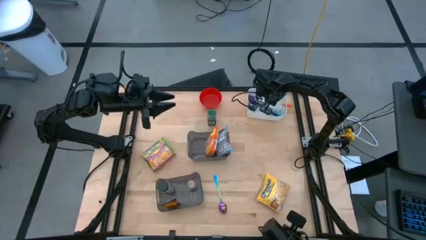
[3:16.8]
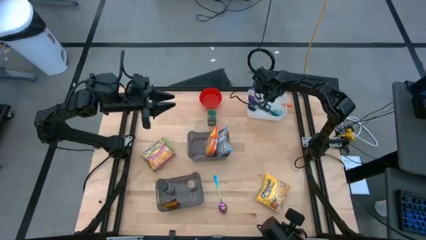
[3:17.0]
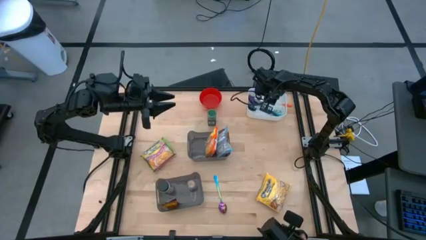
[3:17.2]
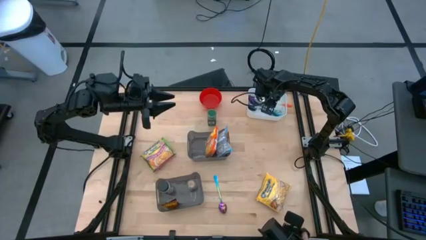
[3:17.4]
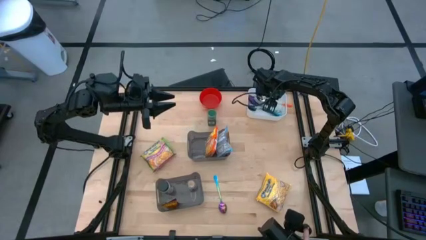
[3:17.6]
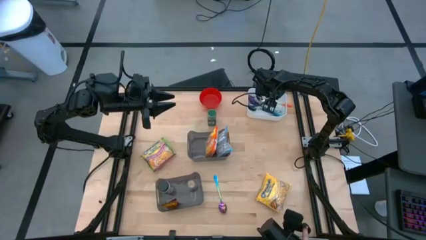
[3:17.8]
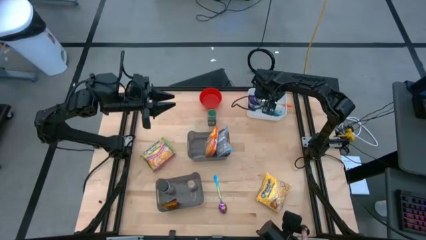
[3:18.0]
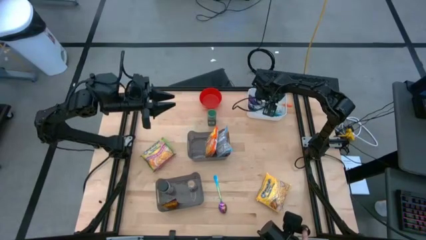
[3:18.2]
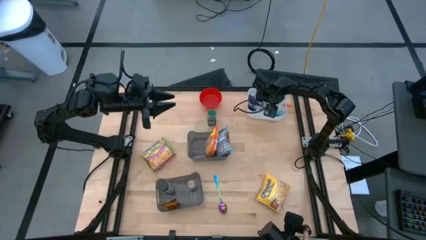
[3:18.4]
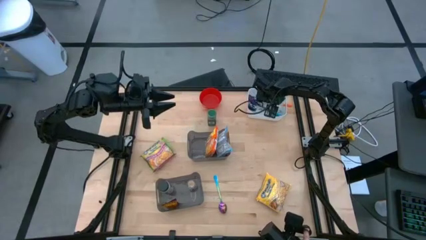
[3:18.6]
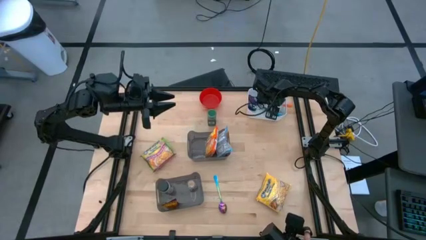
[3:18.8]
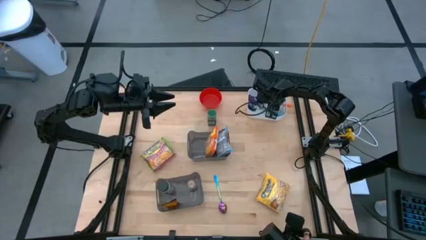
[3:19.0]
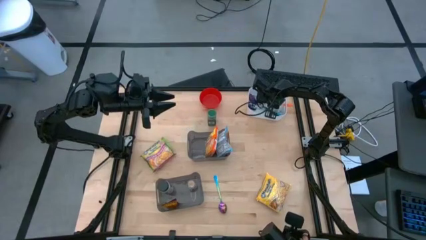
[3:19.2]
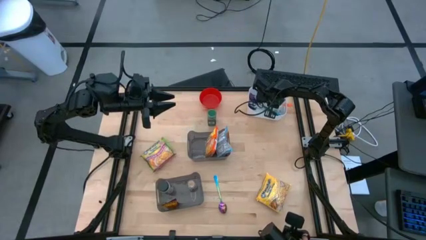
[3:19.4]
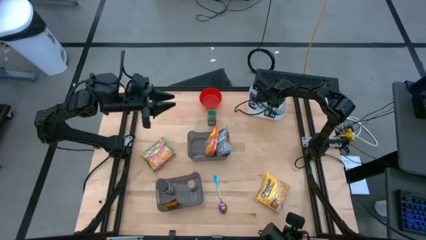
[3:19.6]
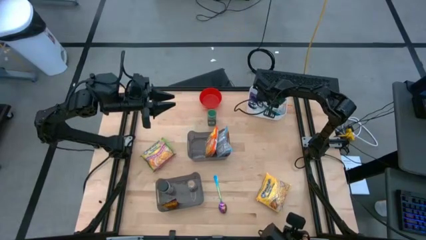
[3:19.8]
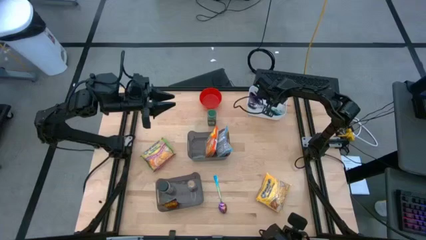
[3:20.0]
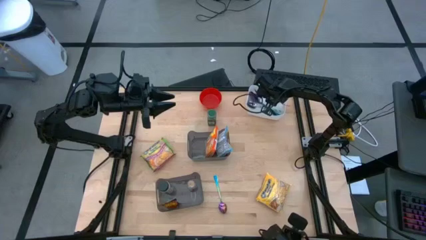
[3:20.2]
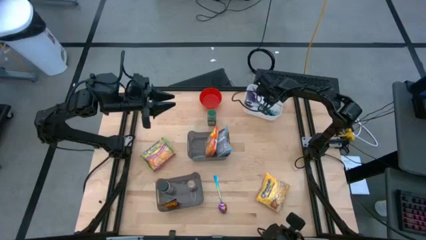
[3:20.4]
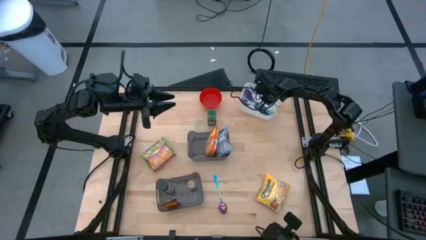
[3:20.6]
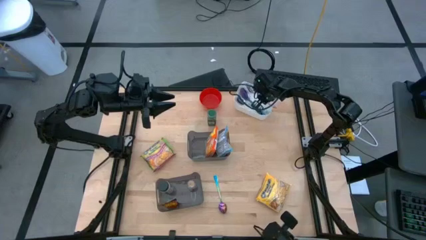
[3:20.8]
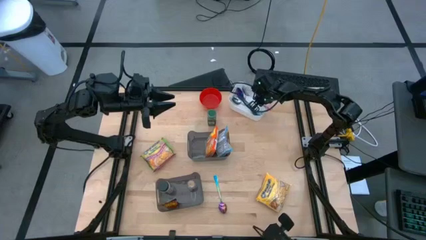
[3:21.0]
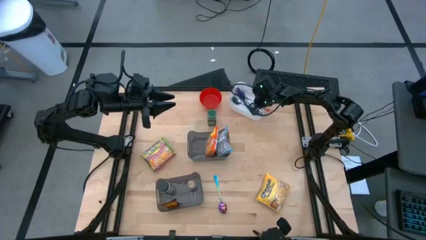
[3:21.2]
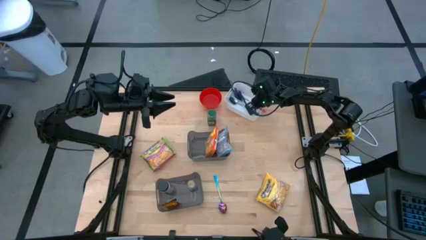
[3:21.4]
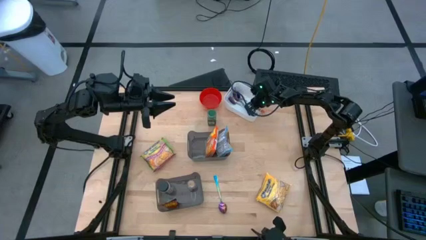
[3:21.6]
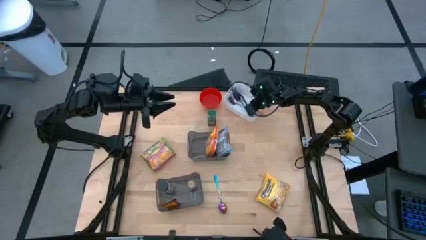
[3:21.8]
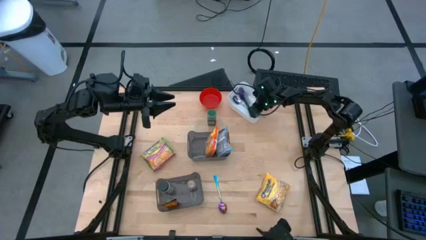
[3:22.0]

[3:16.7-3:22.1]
Task: Pick & Place Food Item
Put the orange spoon into the white bin

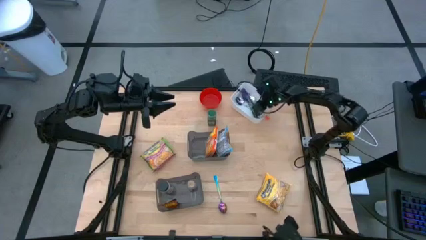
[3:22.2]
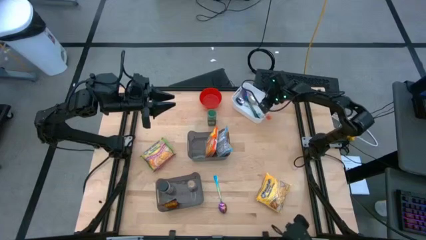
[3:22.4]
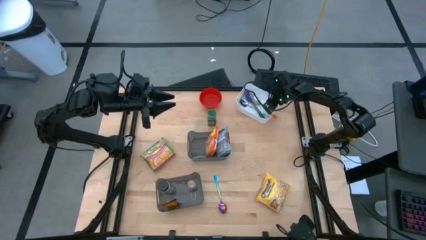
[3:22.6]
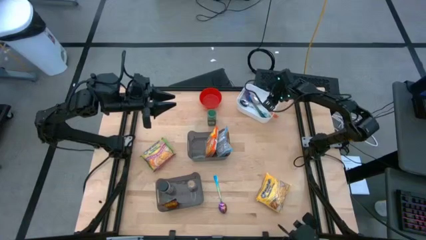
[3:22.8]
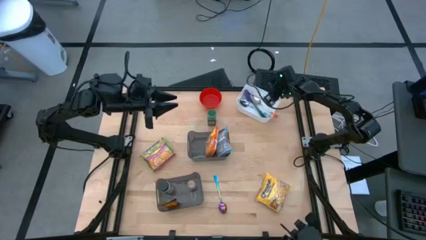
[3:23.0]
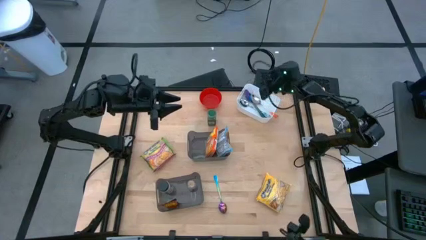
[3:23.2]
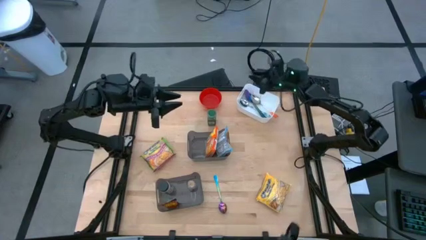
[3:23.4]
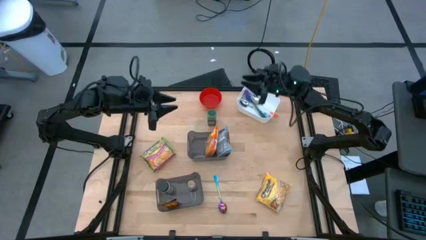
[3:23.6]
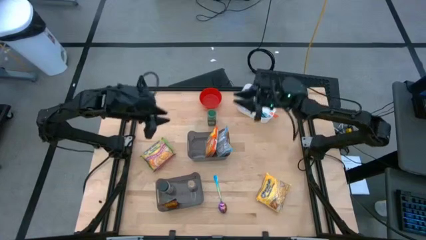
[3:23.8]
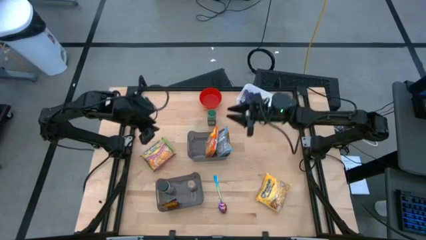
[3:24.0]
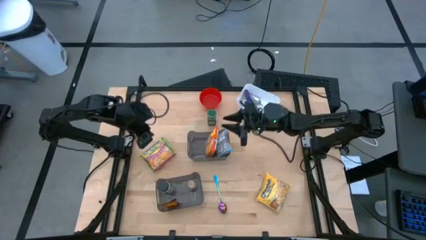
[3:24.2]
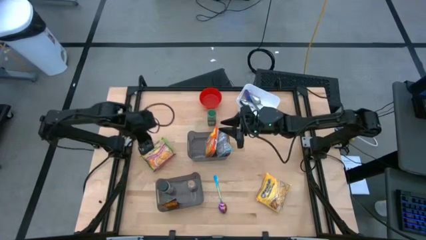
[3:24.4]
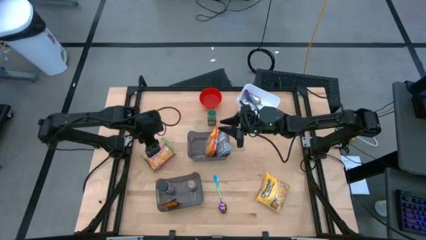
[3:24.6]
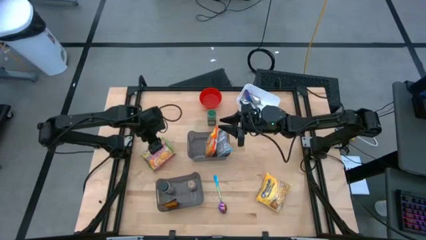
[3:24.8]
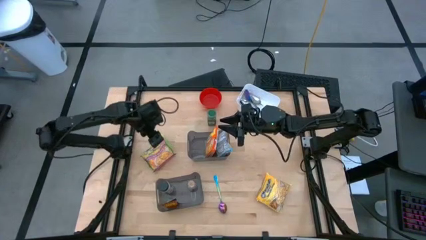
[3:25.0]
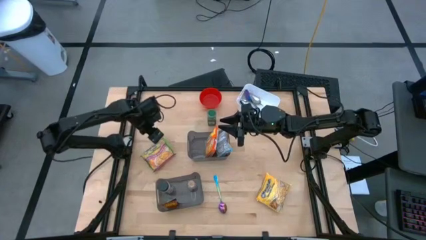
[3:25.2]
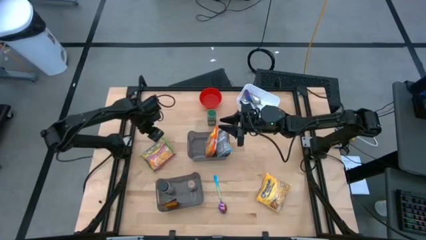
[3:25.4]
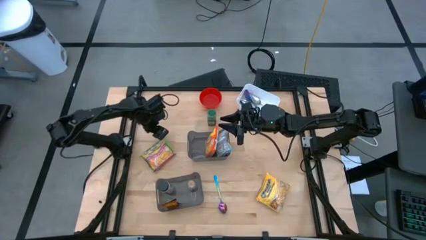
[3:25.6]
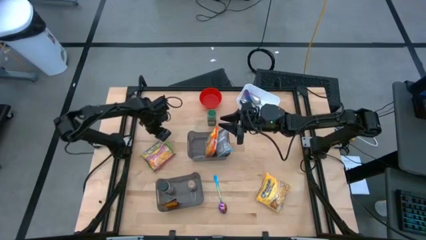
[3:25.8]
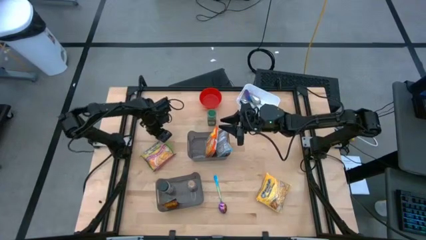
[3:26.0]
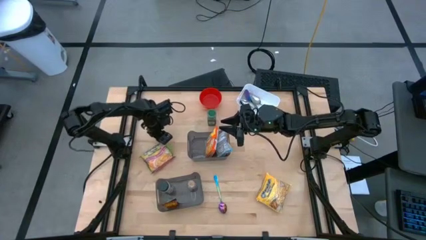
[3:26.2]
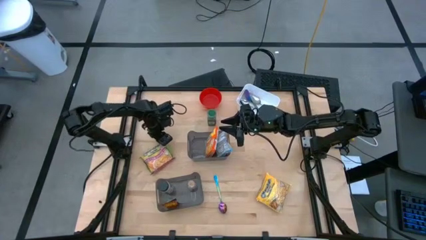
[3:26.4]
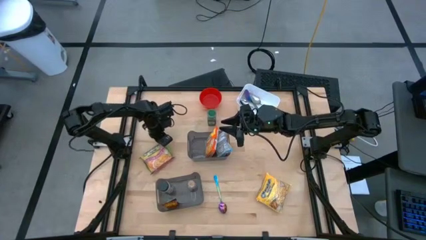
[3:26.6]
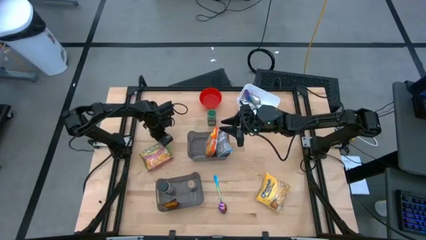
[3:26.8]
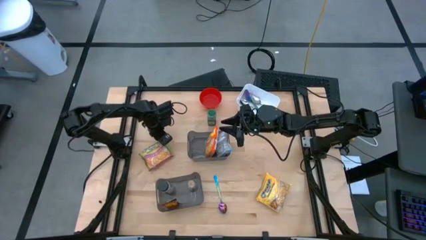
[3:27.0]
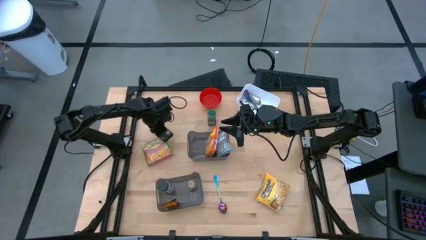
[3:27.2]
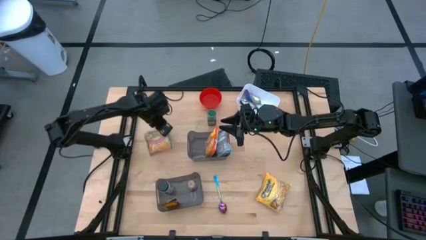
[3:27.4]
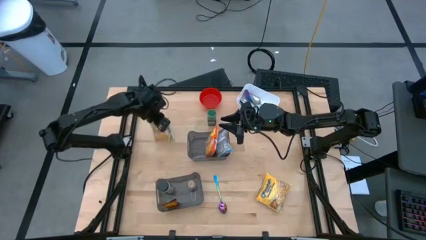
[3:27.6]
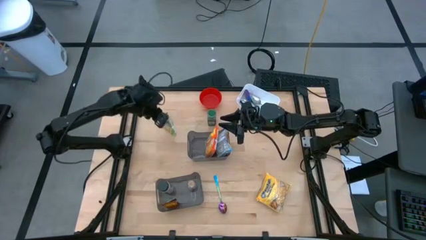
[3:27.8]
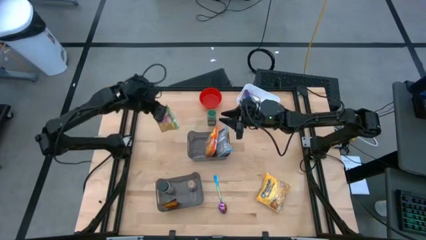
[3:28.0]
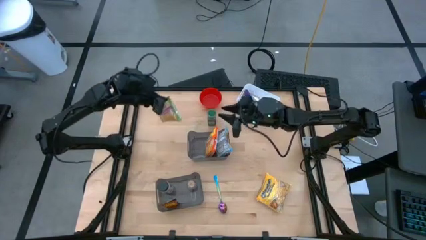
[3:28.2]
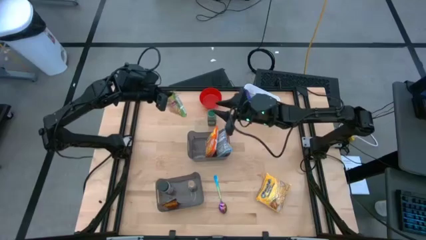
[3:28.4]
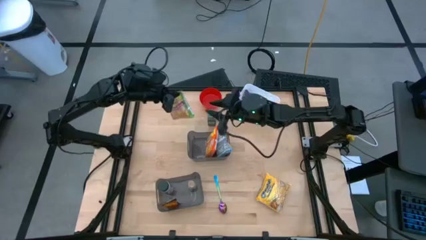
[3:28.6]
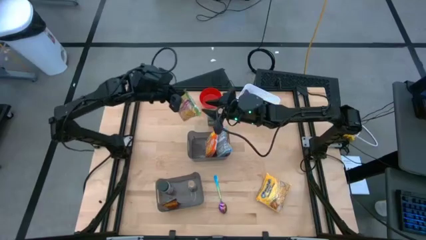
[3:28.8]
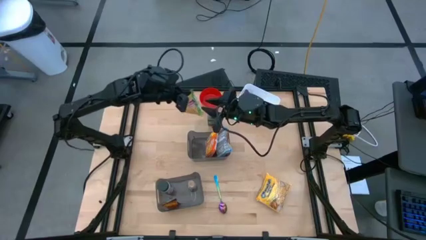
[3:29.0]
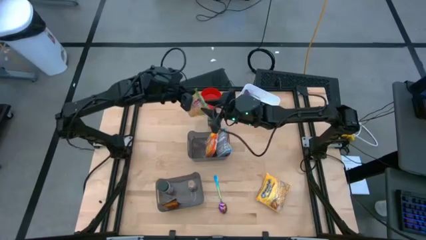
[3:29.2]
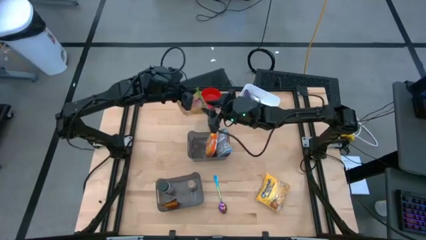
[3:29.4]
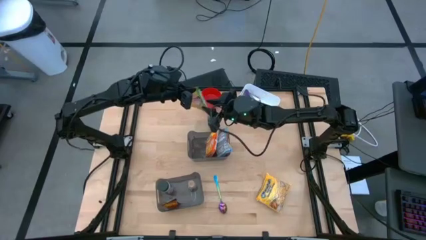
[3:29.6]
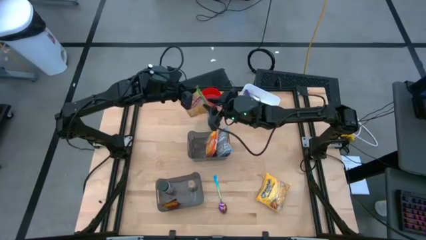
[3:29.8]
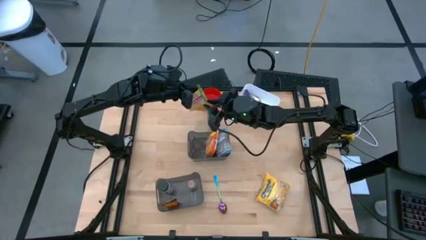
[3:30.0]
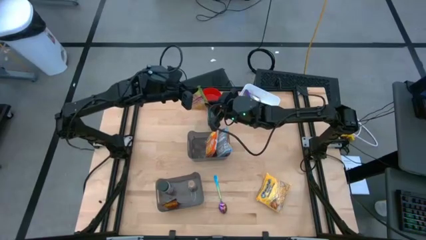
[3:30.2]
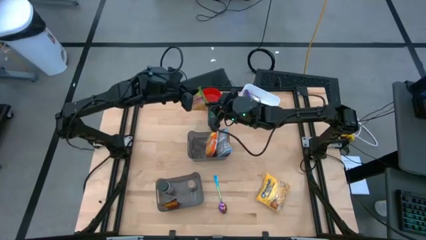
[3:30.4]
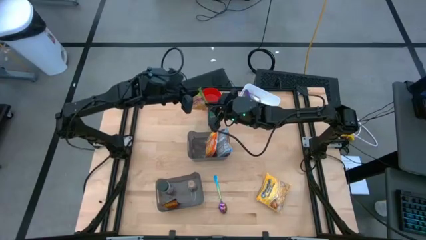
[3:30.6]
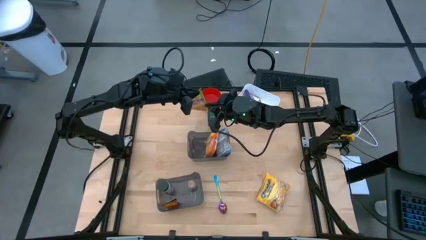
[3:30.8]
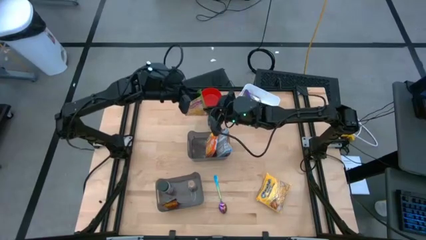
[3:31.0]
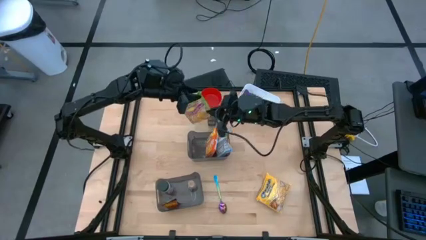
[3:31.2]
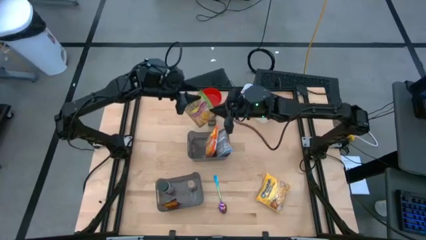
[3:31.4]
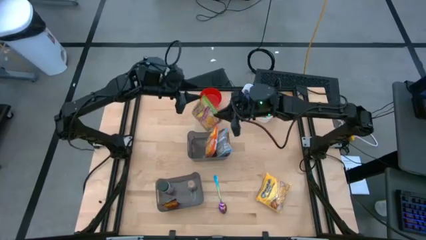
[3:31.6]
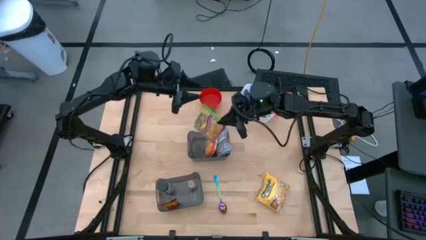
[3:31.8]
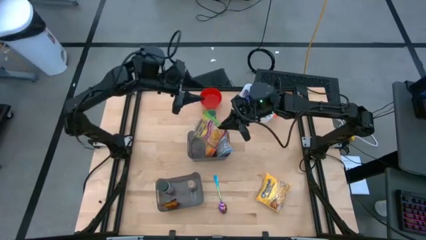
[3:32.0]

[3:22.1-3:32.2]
Put the green noodle pack into the top black bin
